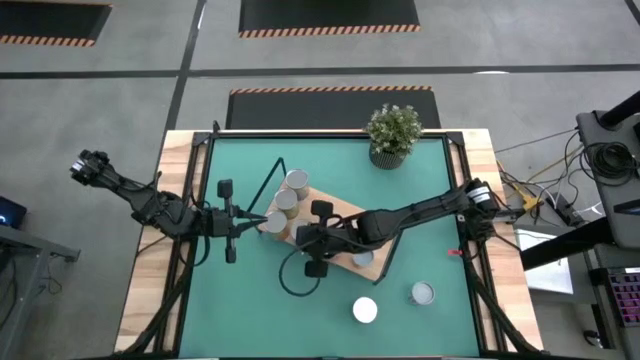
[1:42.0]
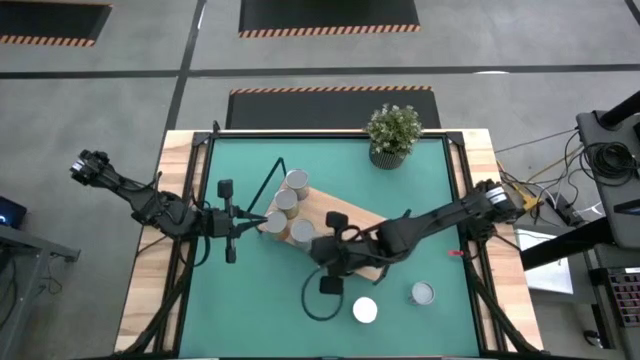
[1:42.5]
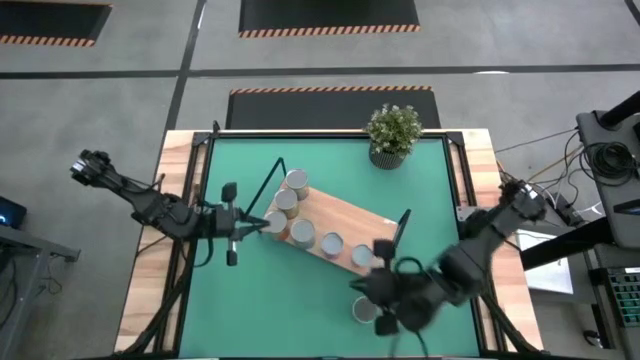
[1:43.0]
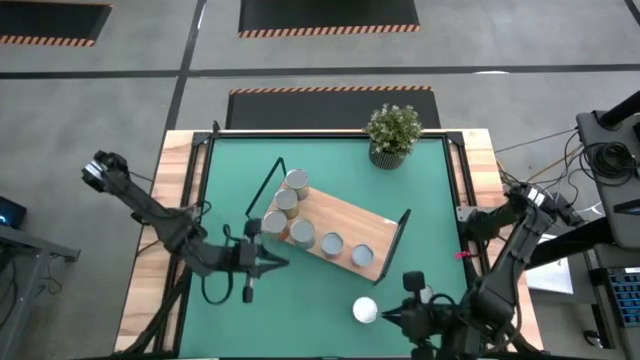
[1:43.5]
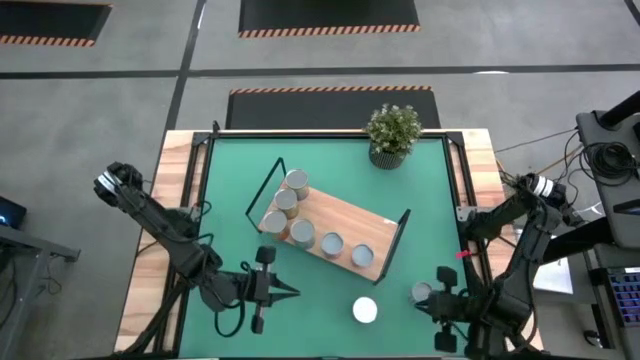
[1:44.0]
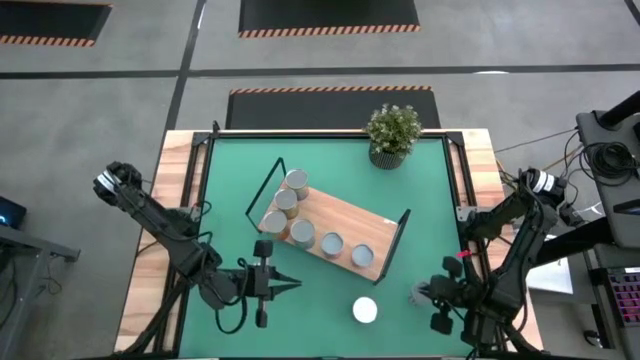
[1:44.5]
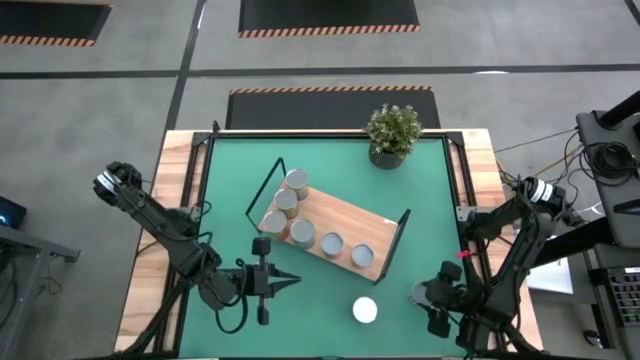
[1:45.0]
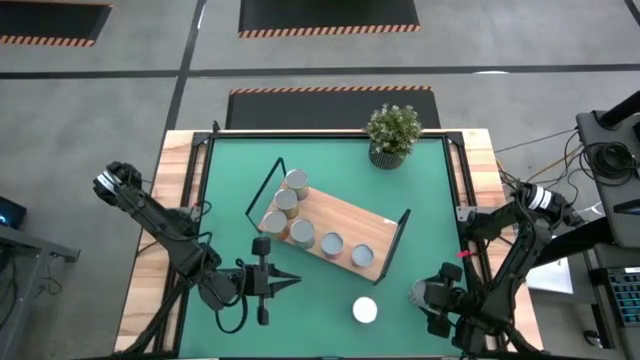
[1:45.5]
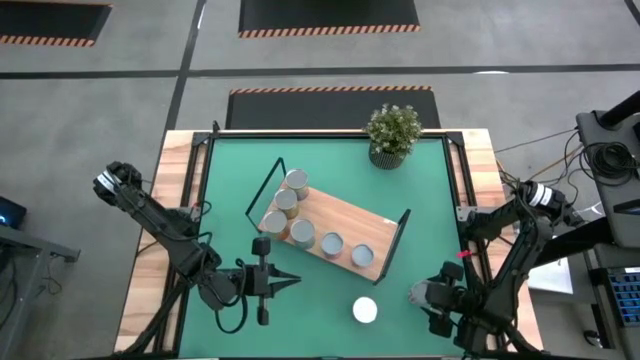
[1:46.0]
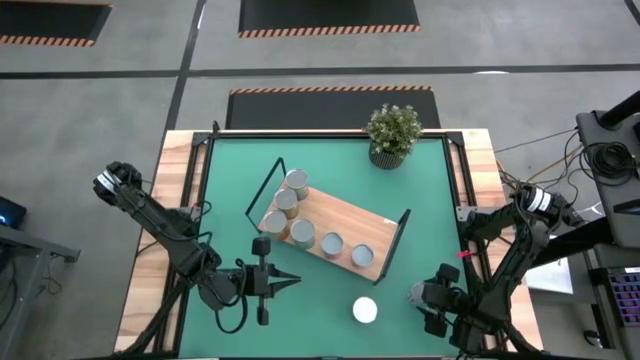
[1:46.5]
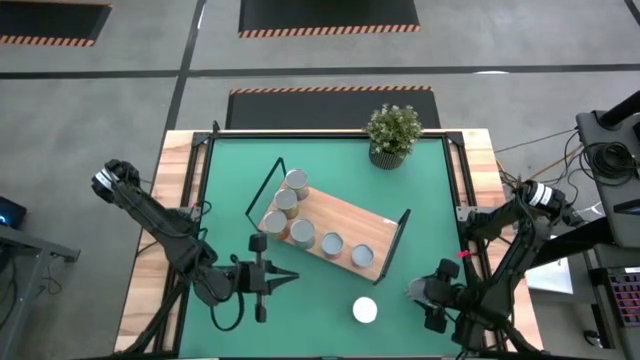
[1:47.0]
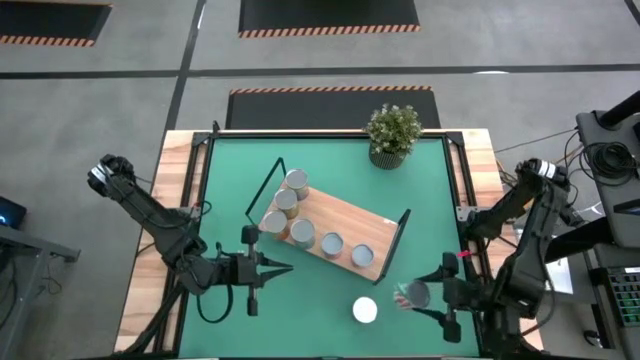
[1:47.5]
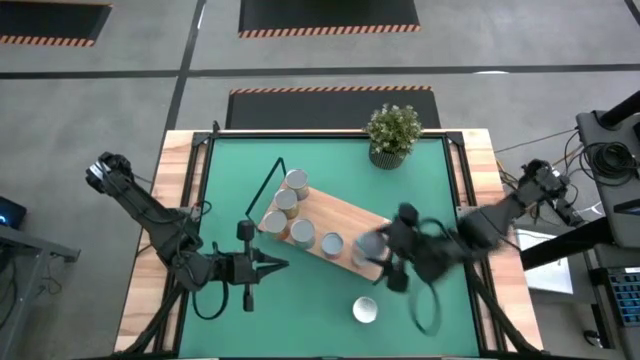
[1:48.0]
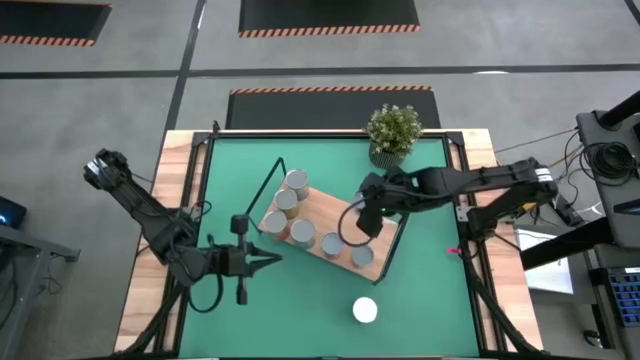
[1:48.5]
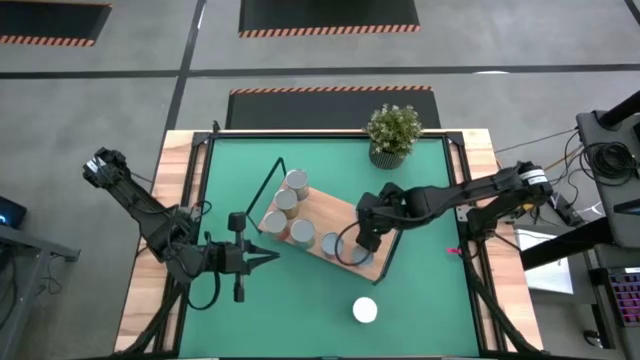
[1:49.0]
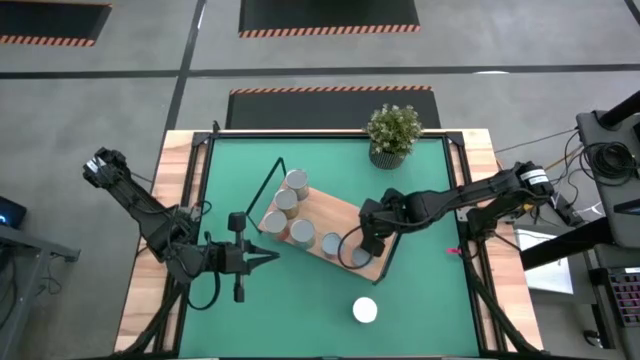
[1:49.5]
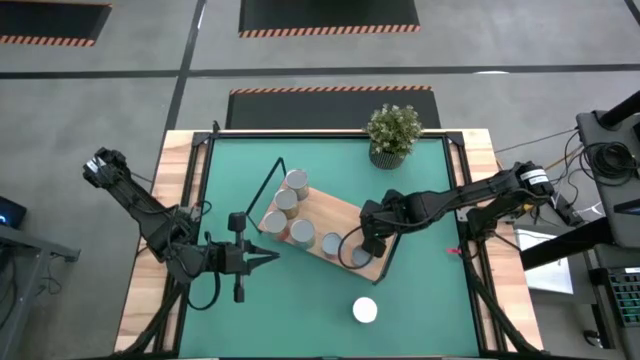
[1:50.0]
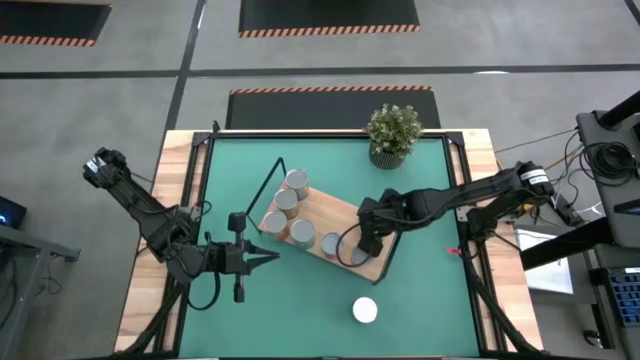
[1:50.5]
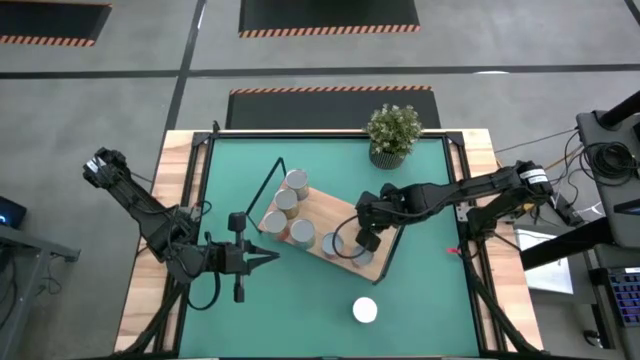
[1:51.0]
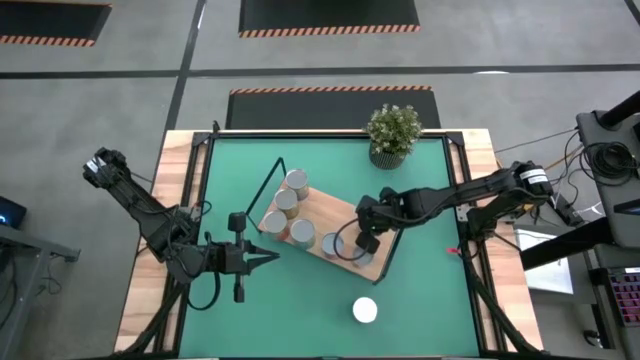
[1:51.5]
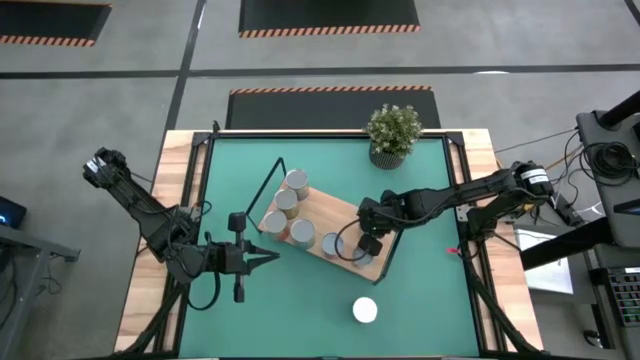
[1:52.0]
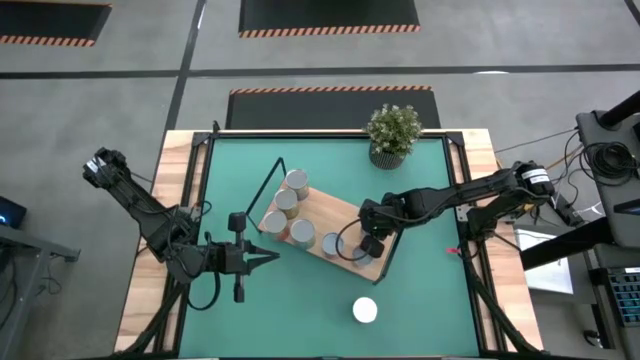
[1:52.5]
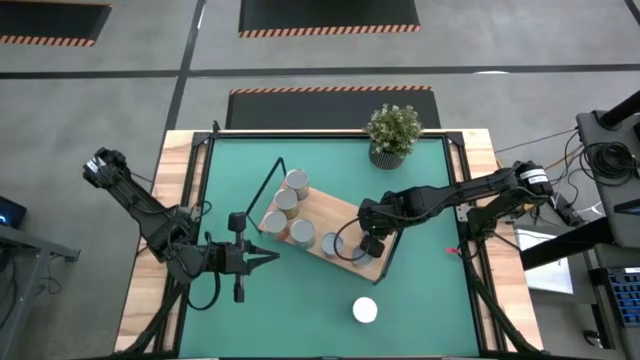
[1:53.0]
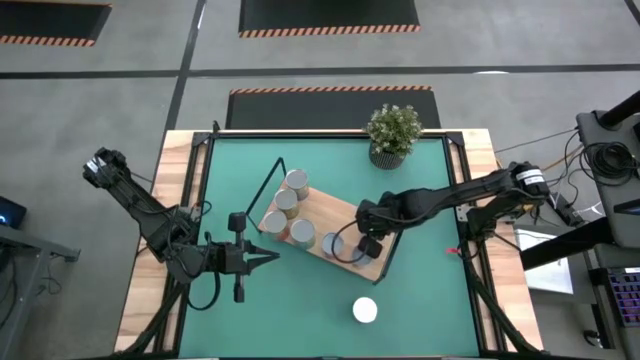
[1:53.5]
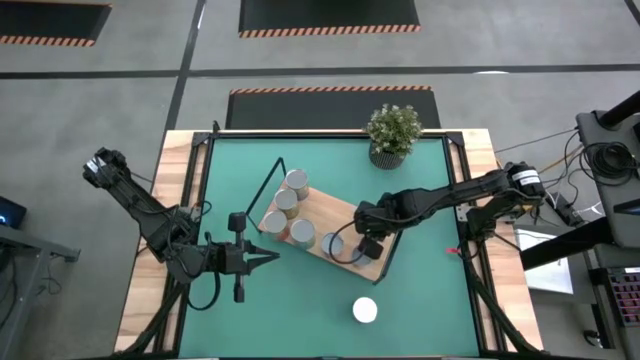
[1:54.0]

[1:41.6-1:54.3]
Task: Pick and place cans onto a shelf
Put the canned carrots on the shelf

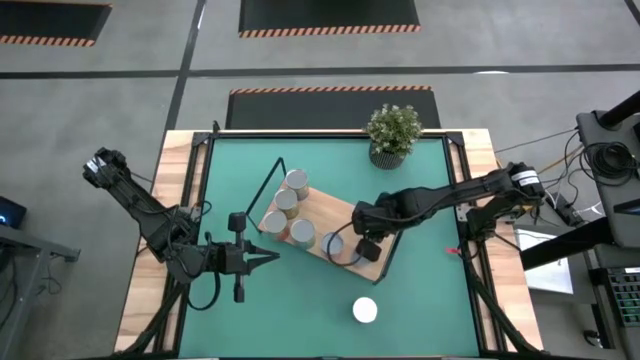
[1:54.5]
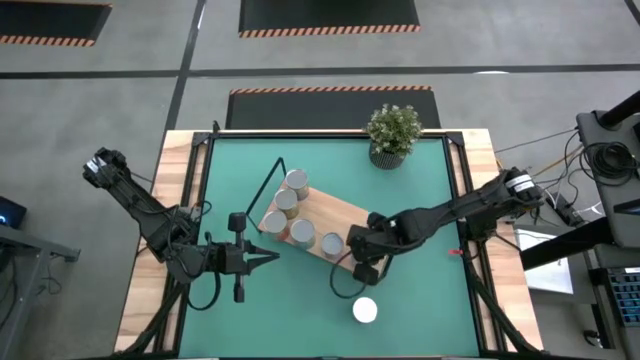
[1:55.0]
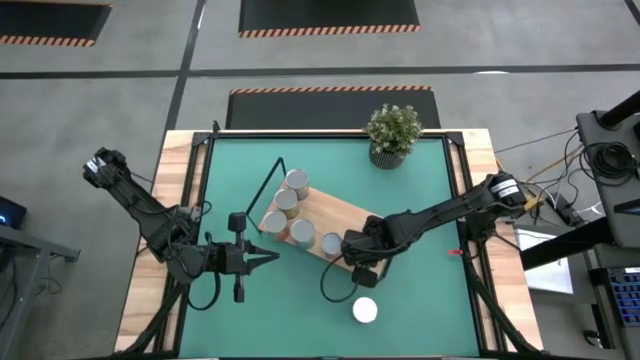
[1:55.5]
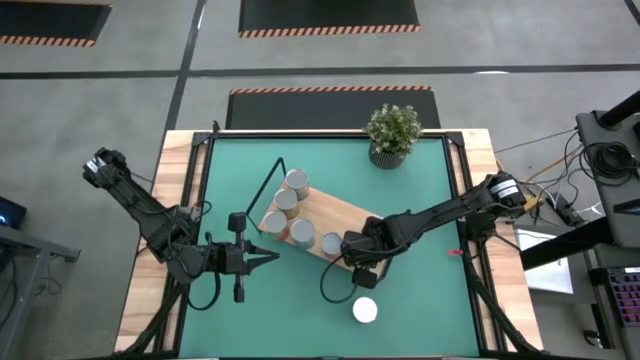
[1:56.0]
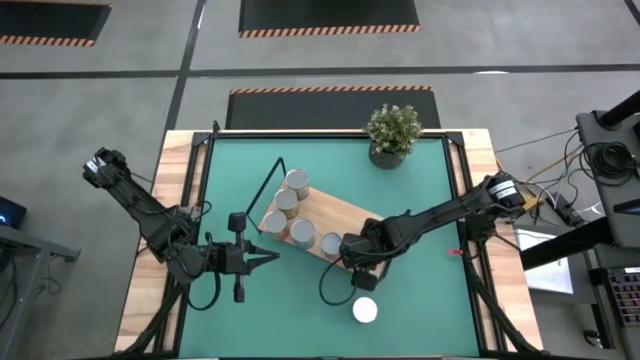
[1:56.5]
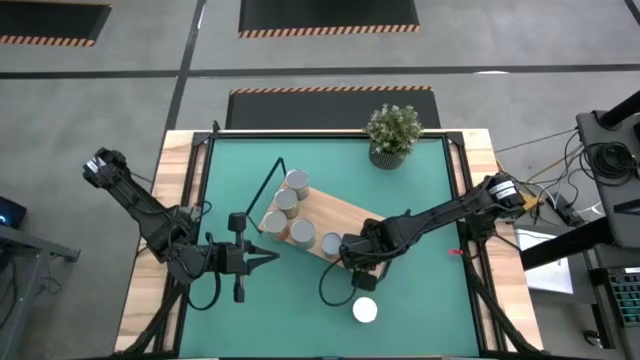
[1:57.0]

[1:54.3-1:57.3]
Adjust the small canned oranges on the shelf

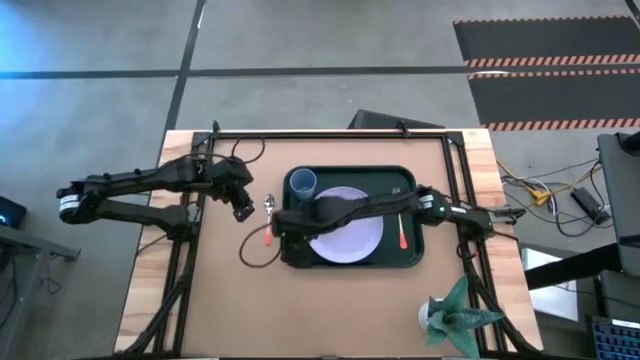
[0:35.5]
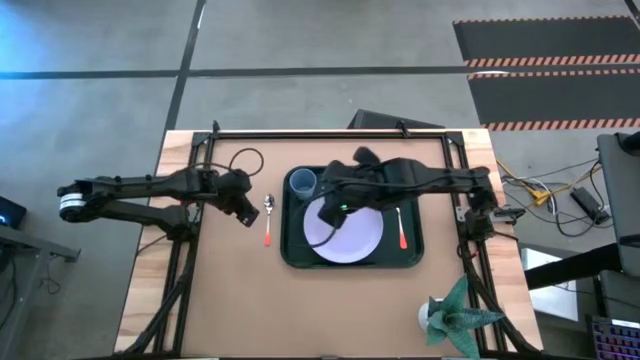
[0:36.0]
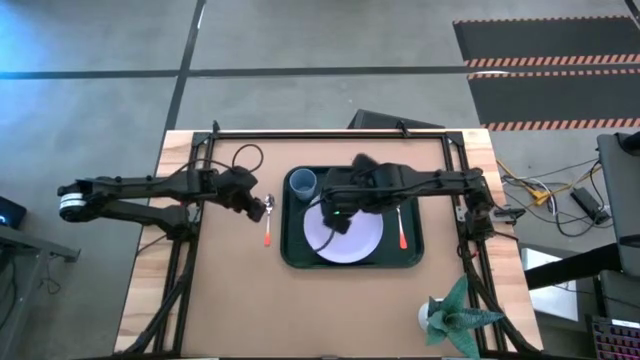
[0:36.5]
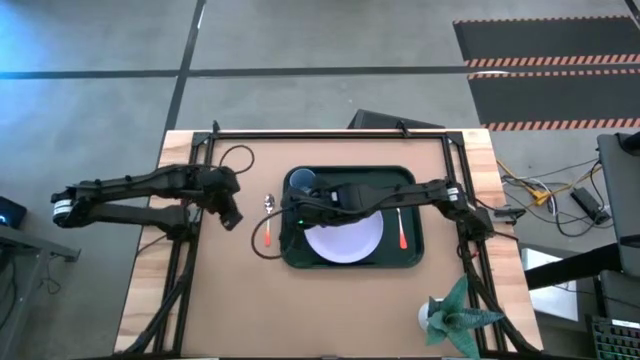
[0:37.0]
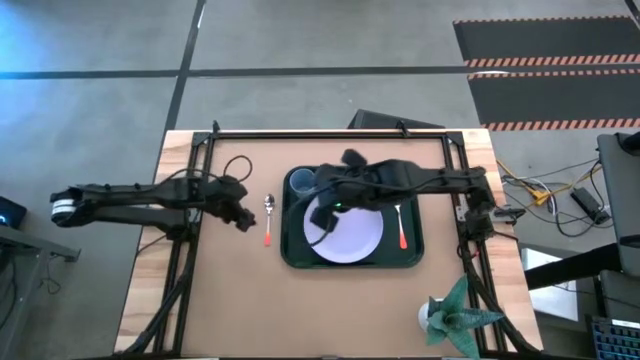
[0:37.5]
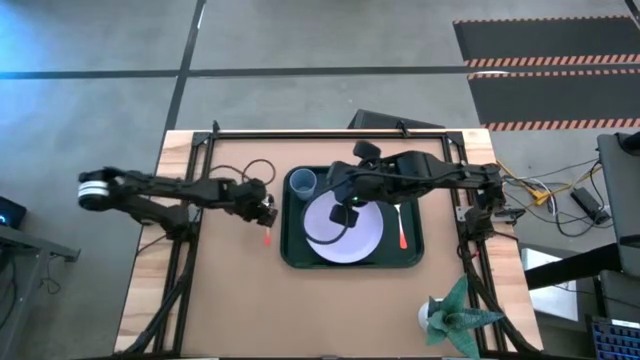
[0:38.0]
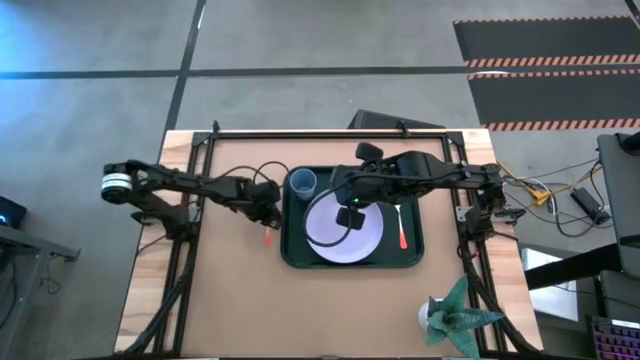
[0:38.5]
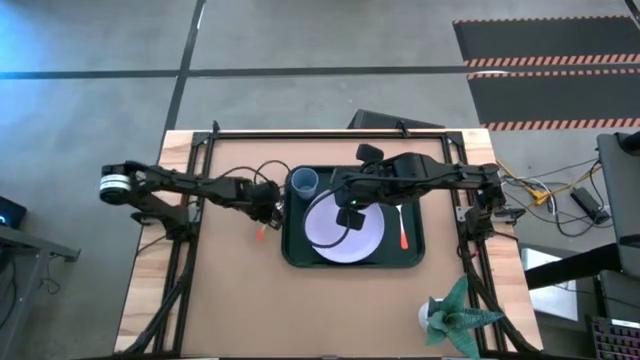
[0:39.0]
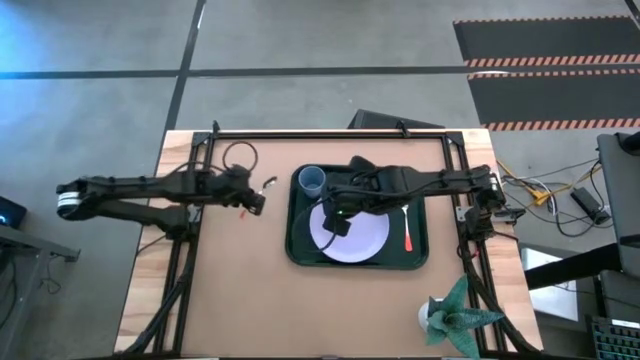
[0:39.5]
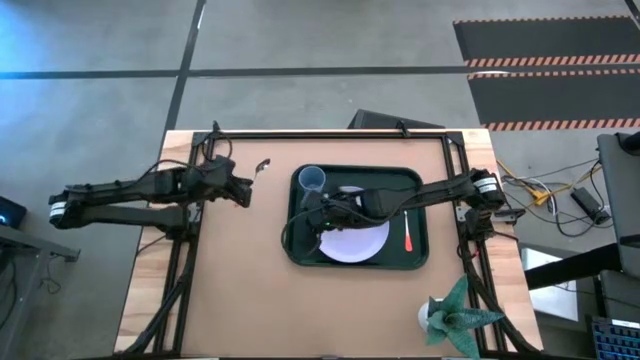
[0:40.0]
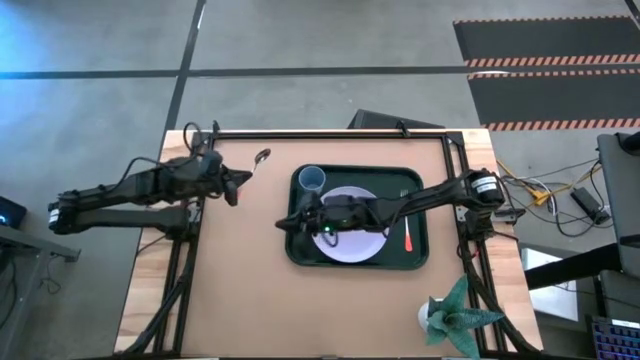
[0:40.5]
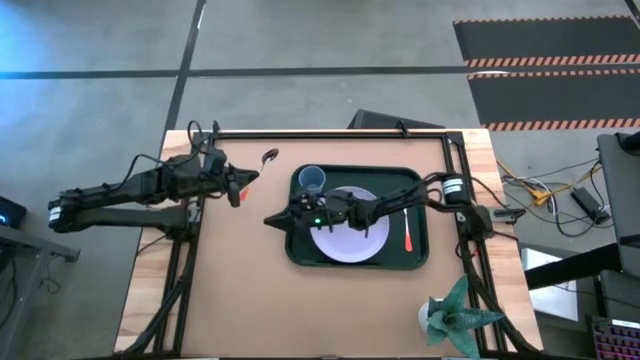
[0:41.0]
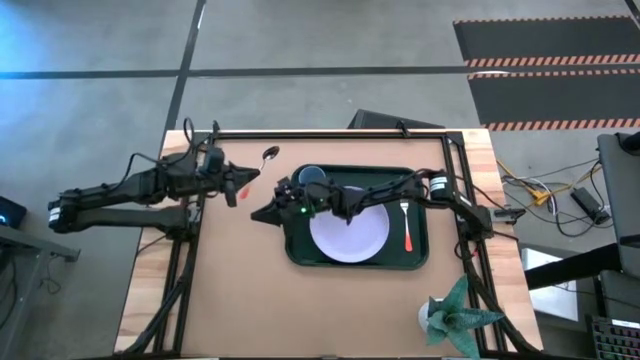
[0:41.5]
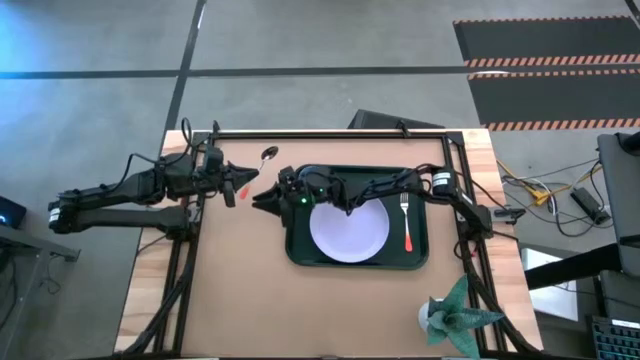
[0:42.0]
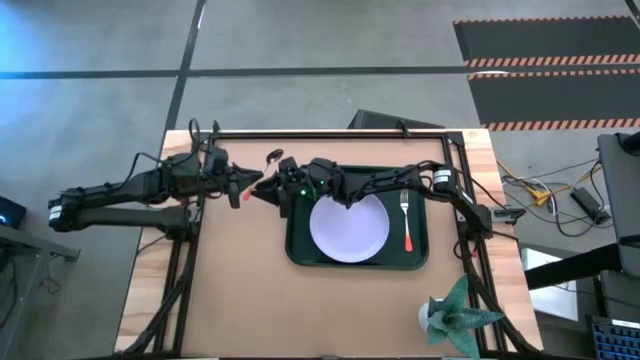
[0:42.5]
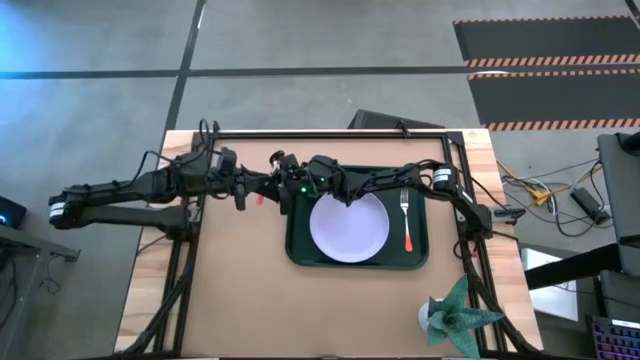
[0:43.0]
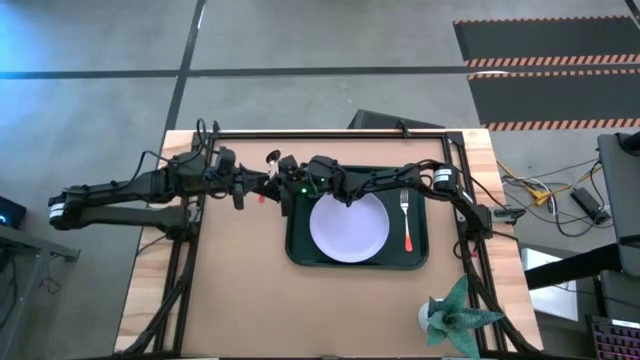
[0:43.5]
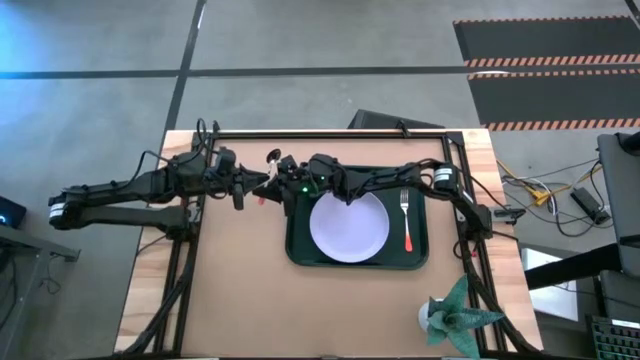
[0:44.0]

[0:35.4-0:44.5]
Task: Pick and place plate/cup/fork/spoon on tray
Put the orange spoon on the black tray to the middle of the violet plate and orange fork
